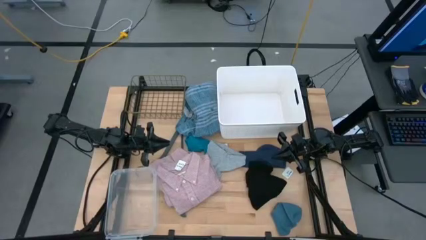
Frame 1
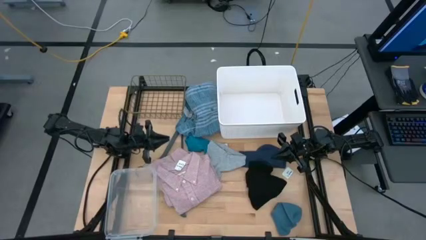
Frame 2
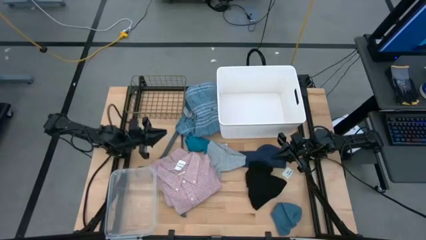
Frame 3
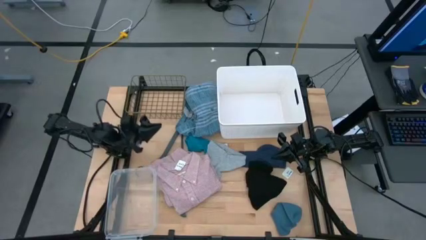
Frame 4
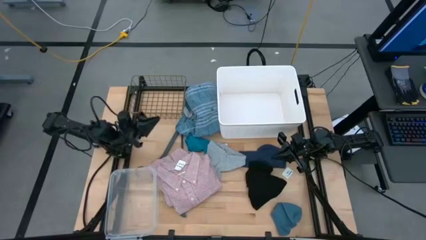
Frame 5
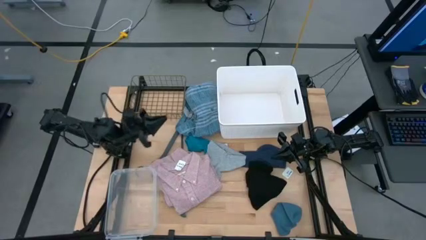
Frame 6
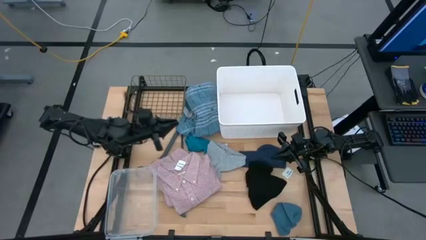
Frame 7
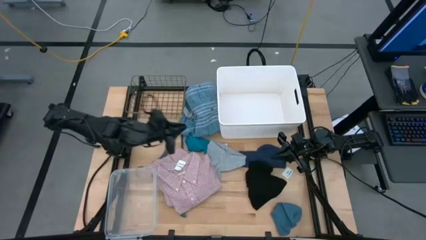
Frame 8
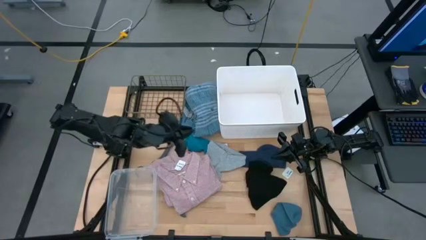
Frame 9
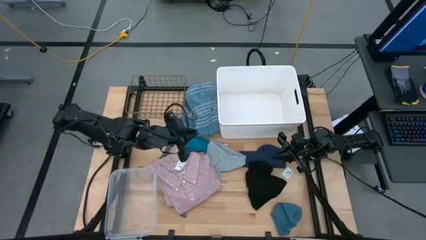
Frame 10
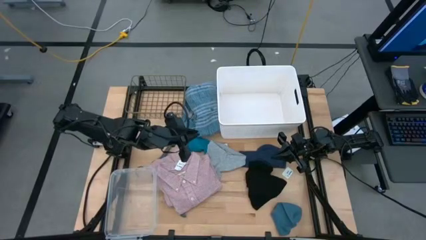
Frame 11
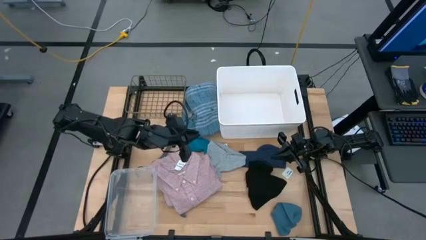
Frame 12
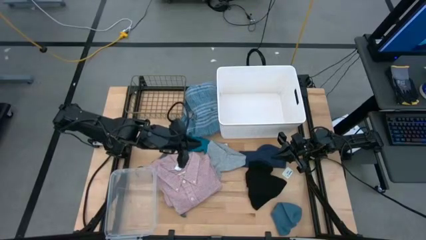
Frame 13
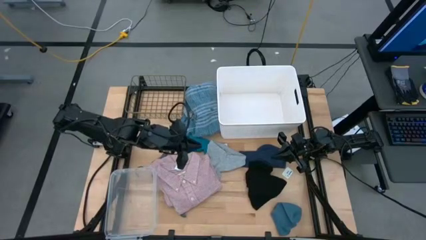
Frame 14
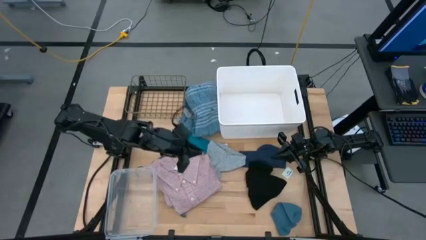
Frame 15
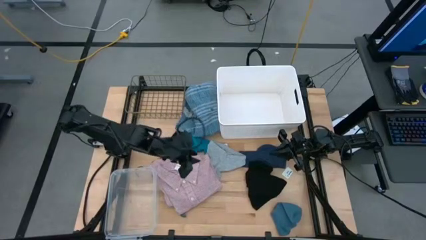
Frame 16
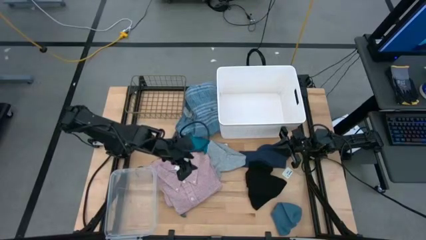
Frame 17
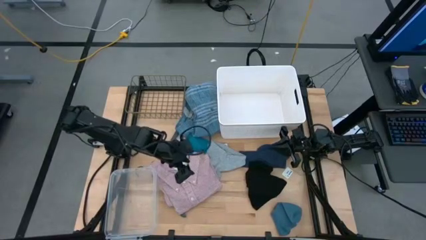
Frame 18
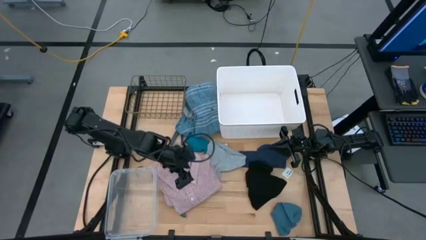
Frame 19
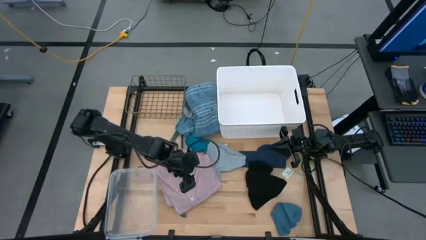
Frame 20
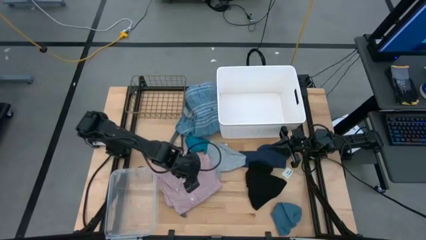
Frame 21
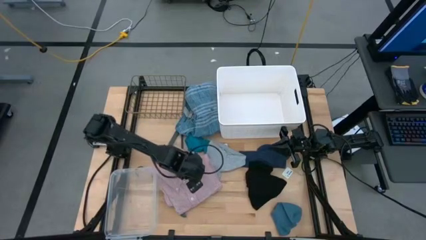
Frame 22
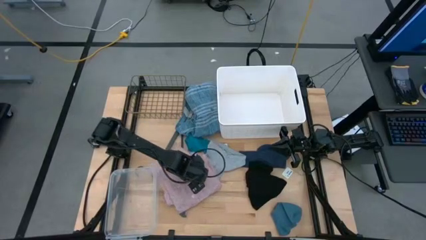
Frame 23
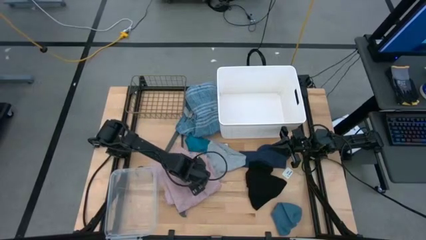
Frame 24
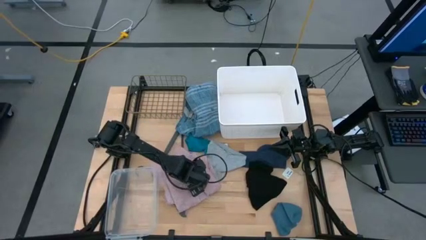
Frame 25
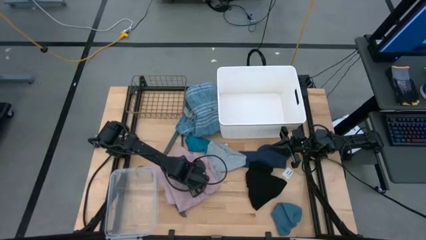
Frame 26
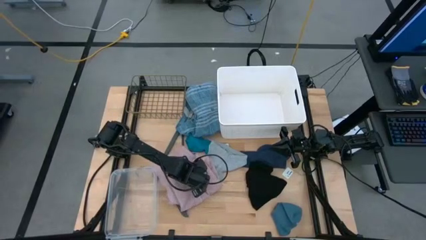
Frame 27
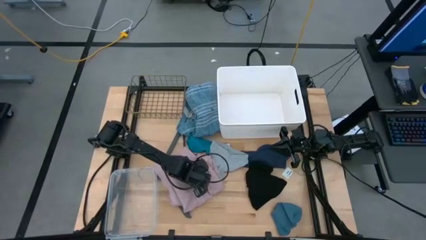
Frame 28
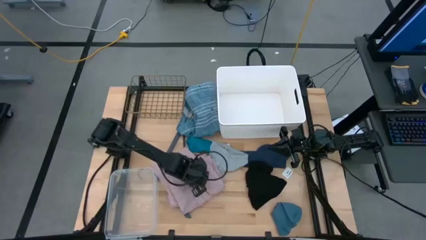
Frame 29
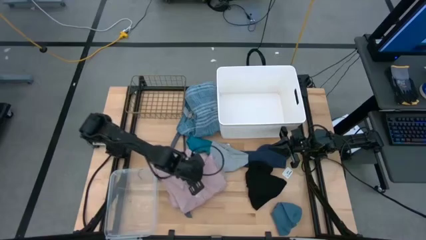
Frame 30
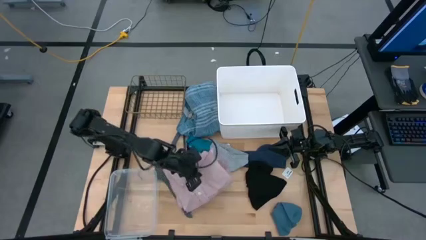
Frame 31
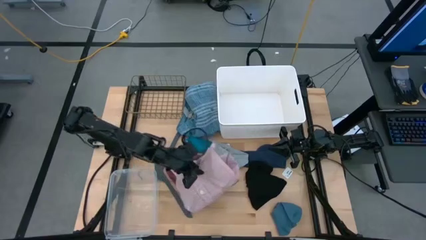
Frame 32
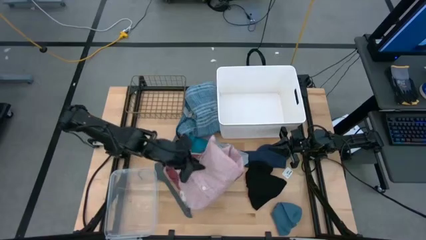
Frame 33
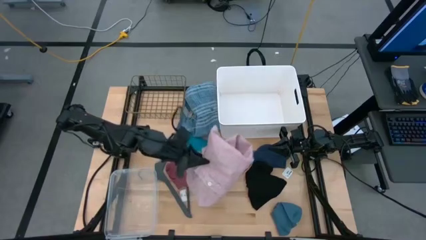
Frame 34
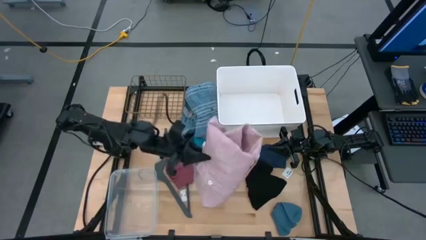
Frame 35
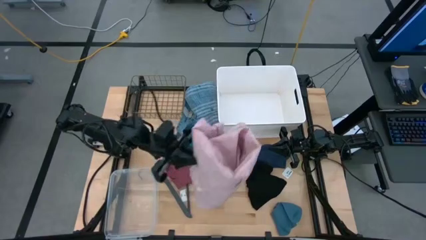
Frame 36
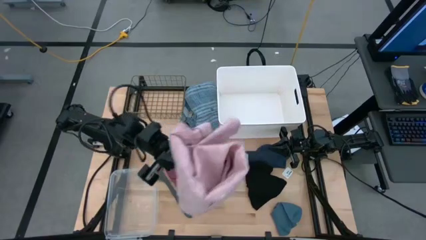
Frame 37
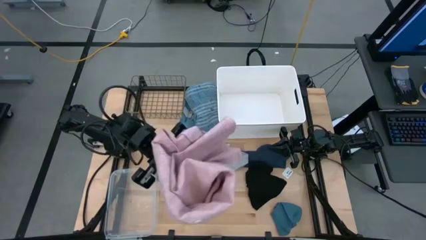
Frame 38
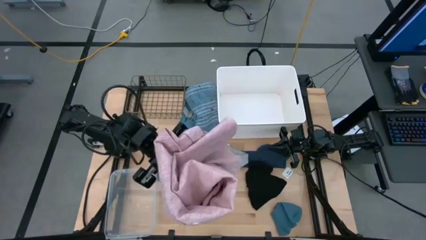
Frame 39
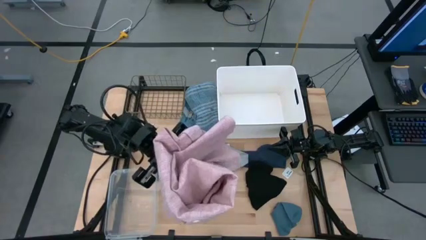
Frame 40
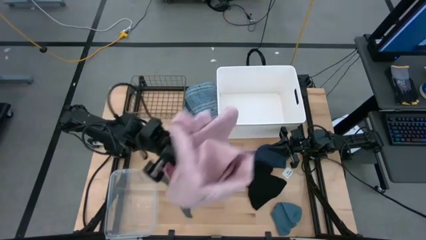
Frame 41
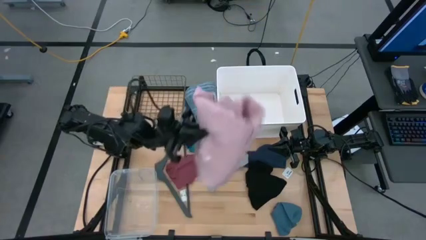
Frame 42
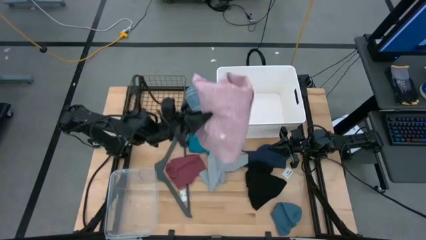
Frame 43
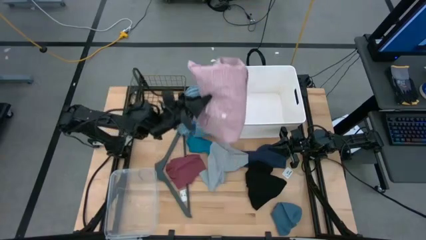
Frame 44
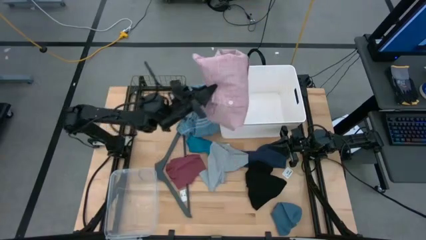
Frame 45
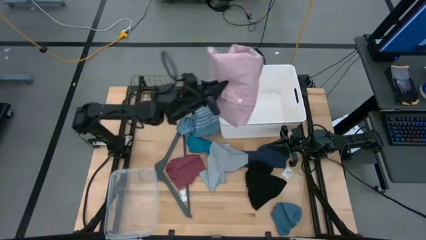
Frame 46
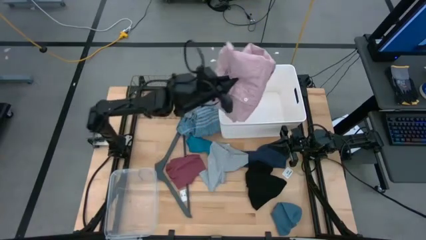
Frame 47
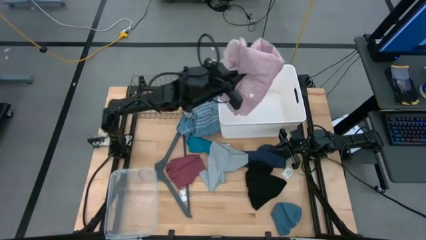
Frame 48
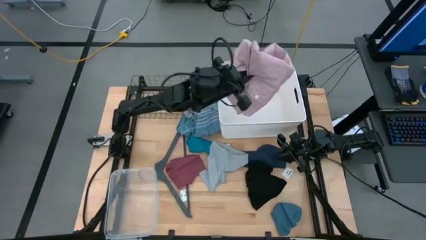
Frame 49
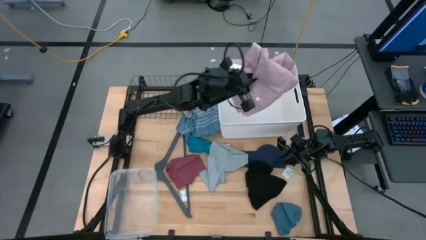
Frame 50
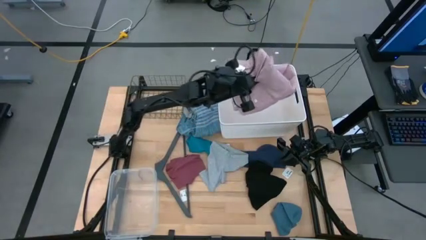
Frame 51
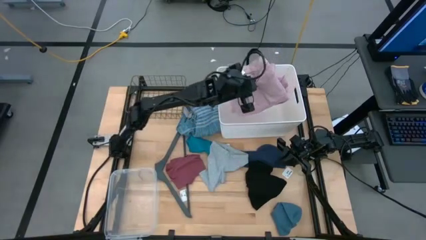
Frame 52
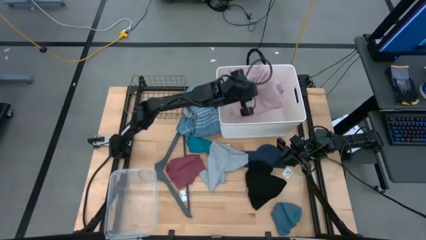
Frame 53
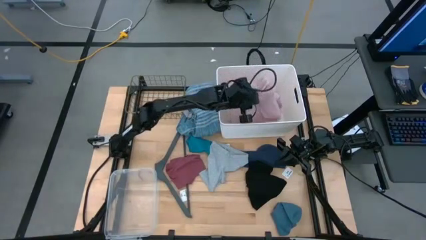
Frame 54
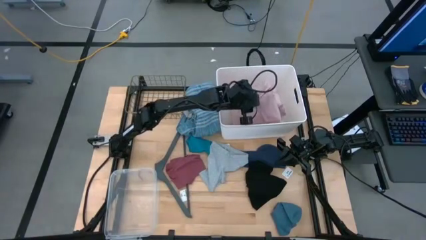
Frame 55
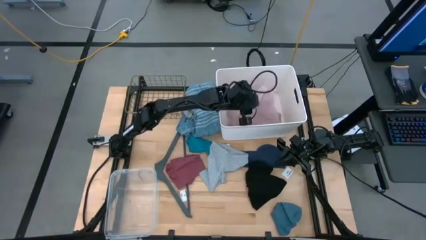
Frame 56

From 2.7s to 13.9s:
Task: Pick & Place Cloths
Put the pink polo into the white bin

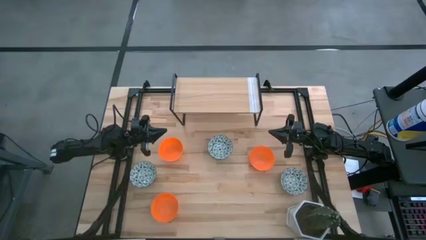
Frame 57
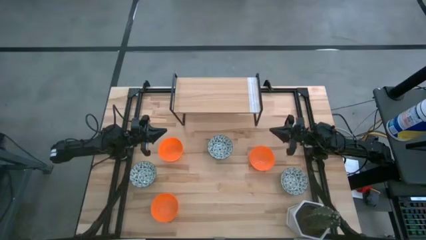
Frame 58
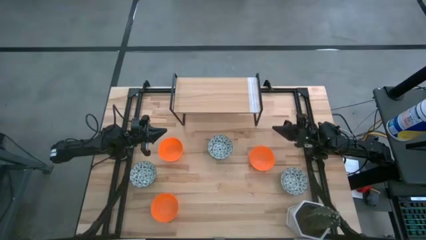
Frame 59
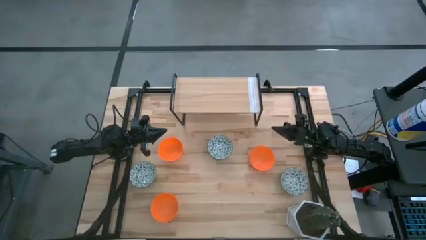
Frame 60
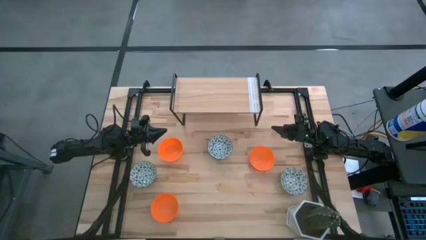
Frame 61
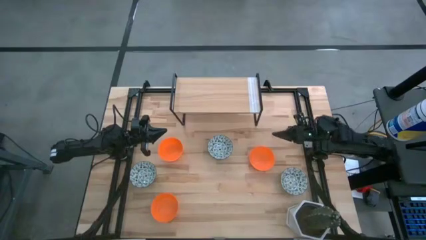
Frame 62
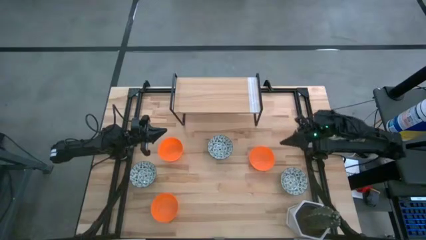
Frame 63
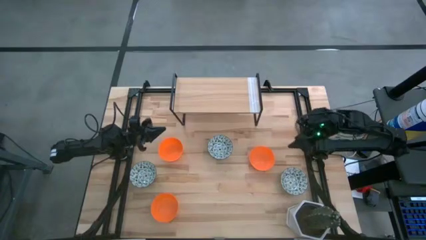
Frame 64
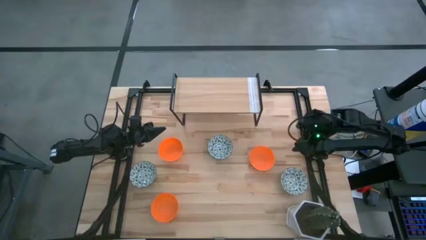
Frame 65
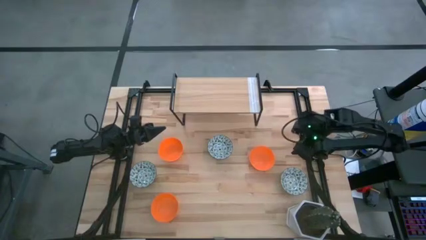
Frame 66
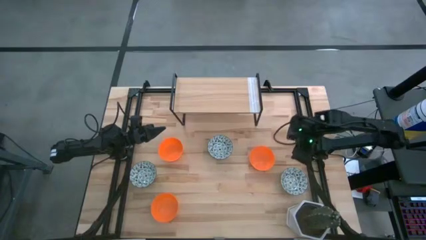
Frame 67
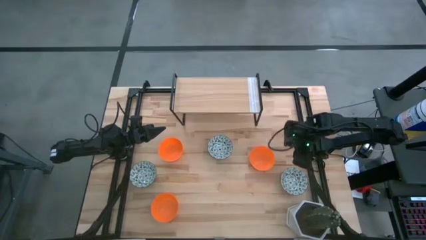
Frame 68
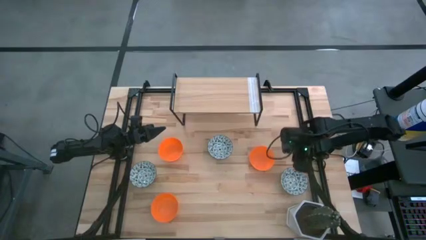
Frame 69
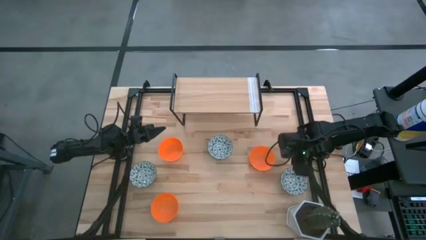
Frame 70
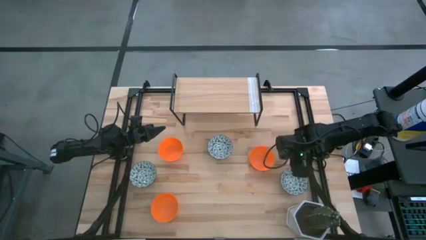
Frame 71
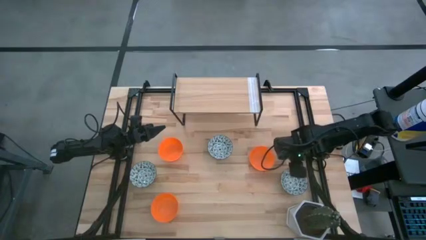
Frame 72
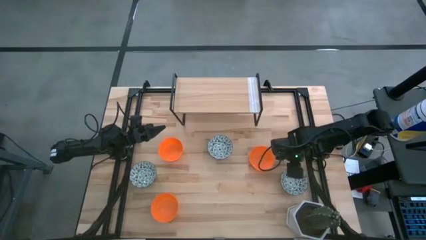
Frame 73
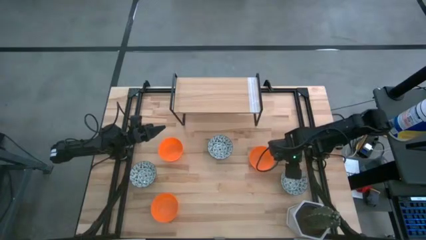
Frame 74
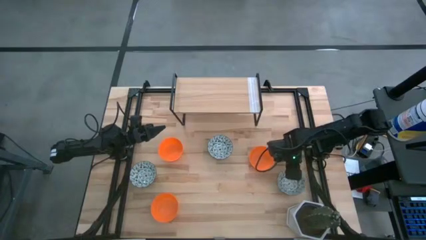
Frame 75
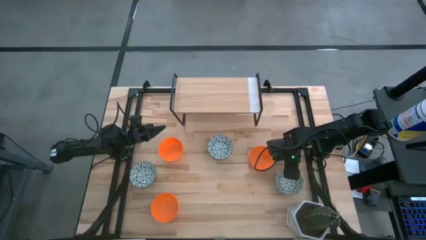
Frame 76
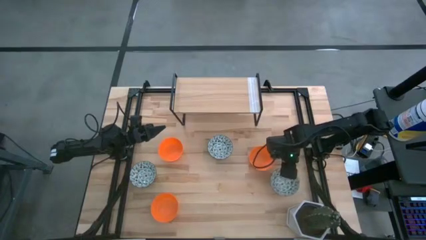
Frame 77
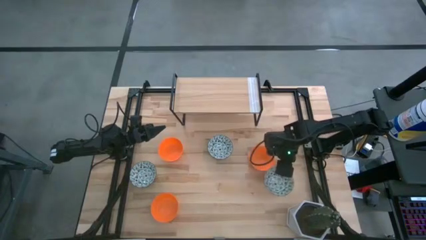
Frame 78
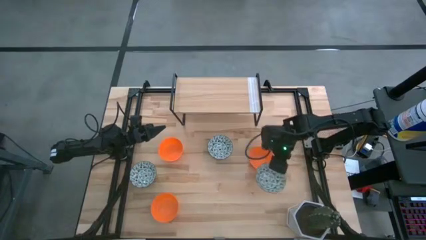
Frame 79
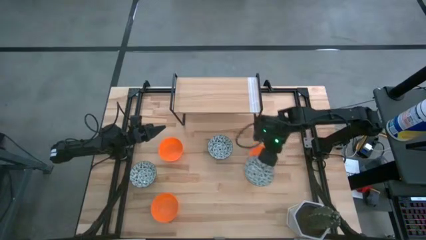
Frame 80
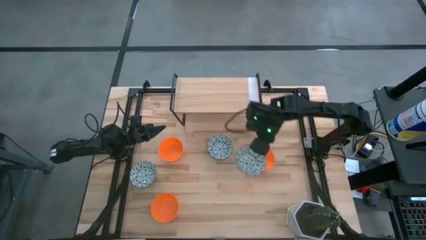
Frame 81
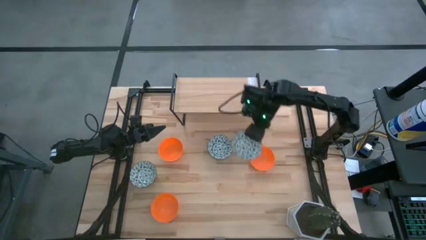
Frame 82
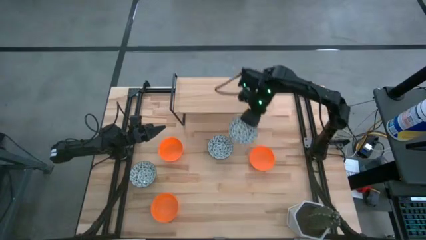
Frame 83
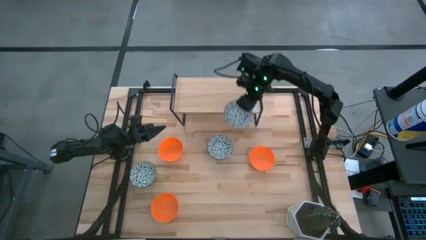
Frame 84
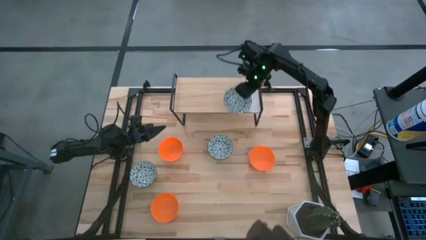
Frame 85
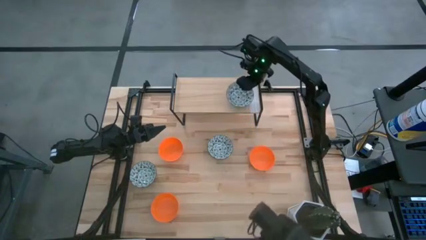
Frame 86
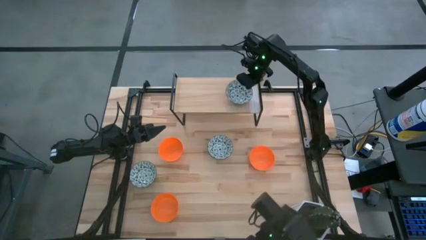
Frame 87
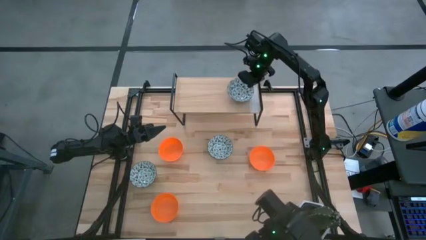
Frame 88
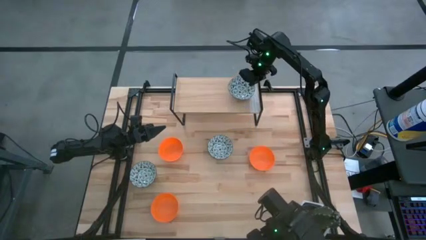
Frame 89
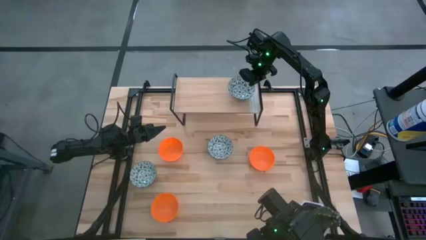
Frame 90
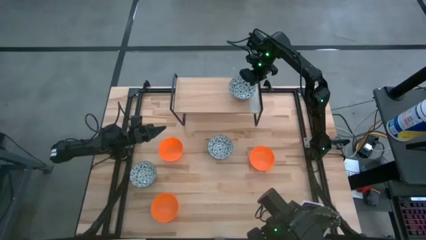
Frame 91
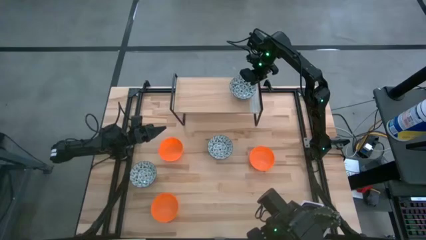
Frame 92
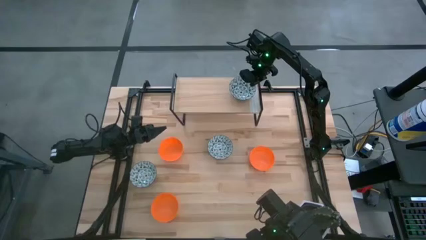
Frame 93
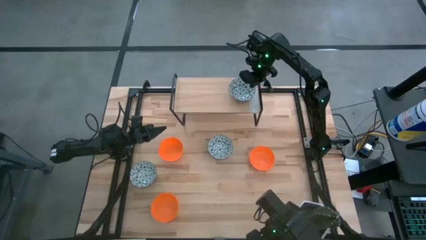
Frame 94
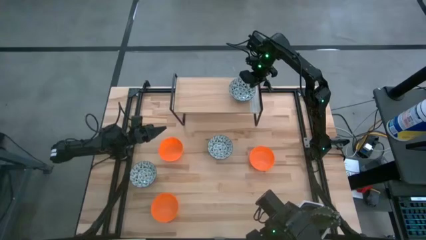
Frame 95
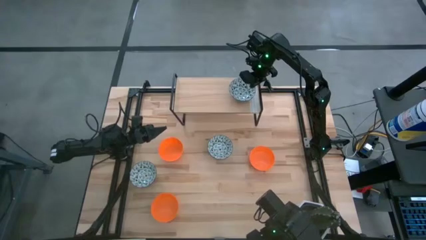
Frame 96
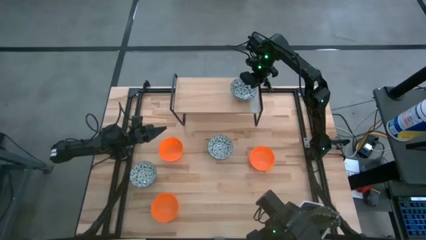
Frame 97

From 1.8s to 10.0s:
Task: Pick & Place Mini bowls
Put the bottom right white patterned bowl on the shelf
